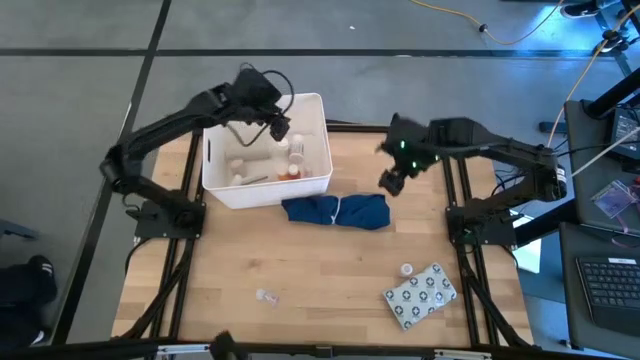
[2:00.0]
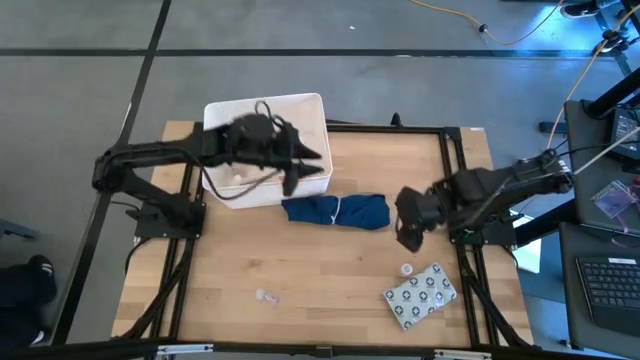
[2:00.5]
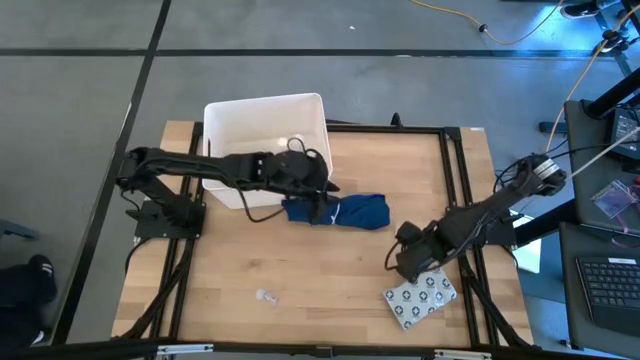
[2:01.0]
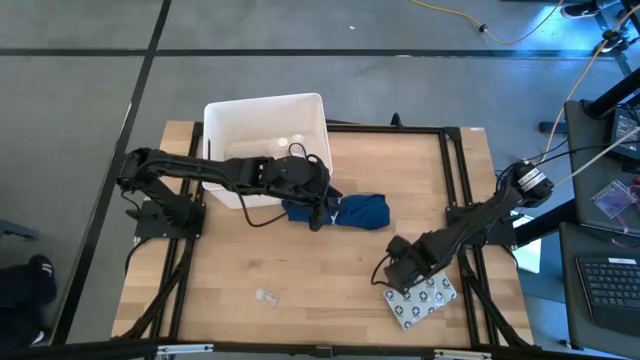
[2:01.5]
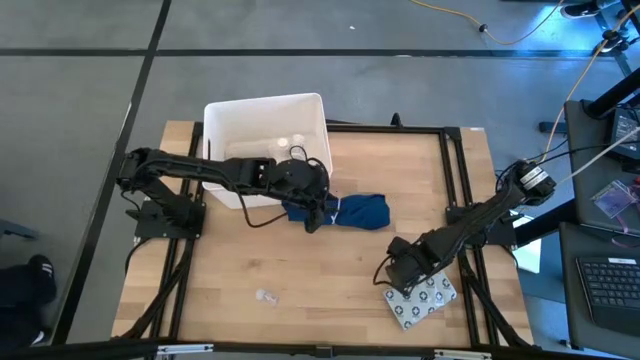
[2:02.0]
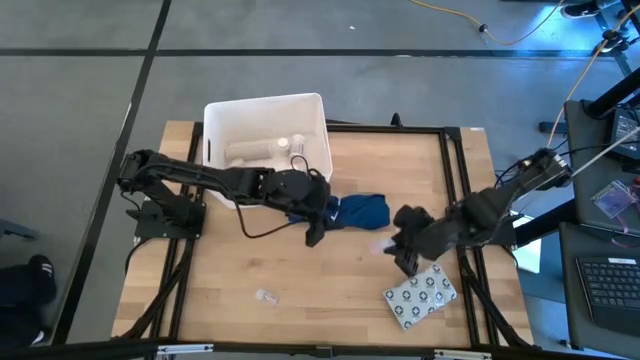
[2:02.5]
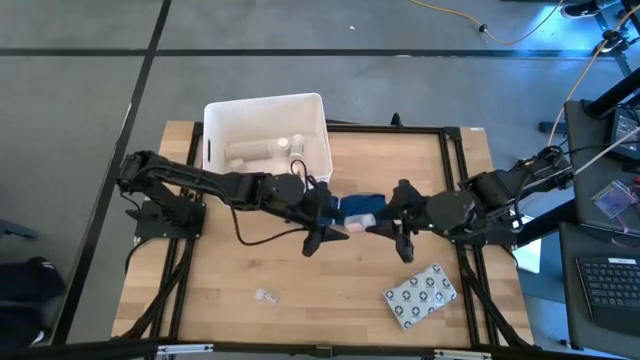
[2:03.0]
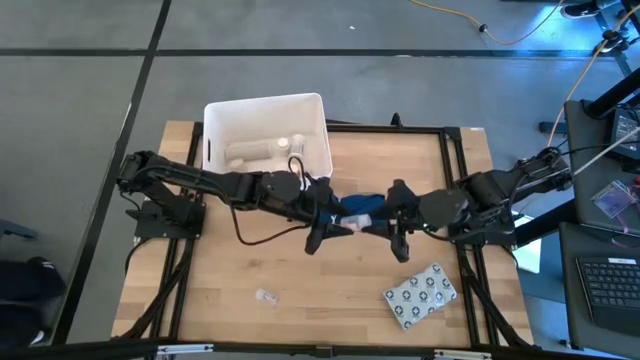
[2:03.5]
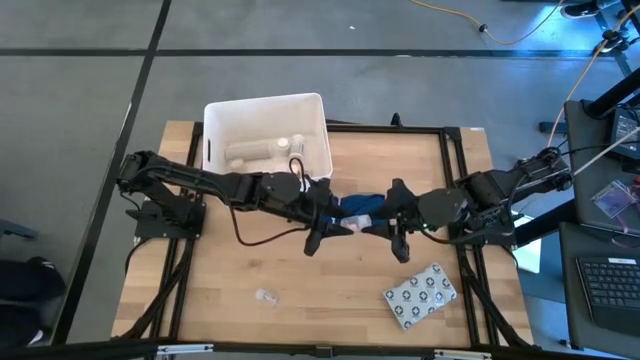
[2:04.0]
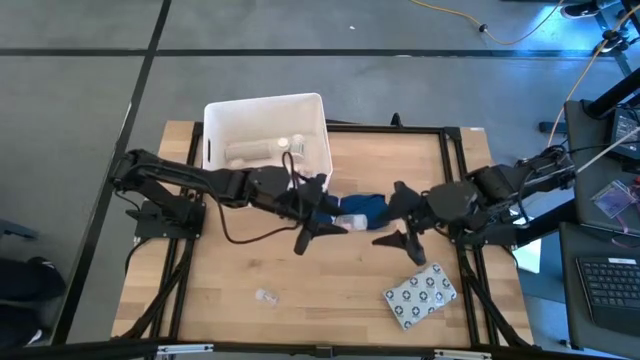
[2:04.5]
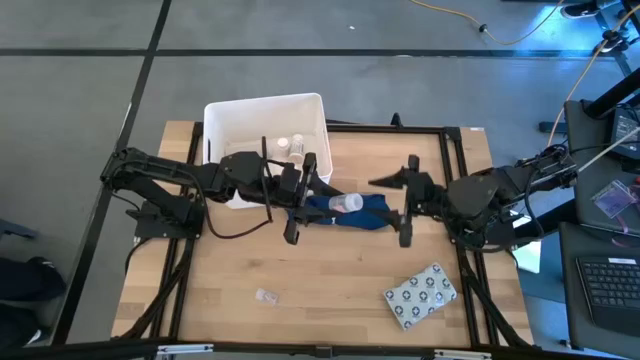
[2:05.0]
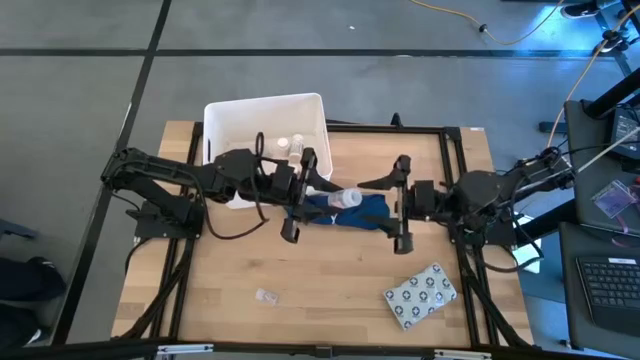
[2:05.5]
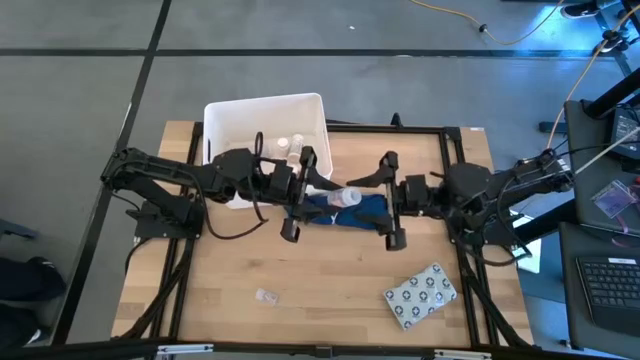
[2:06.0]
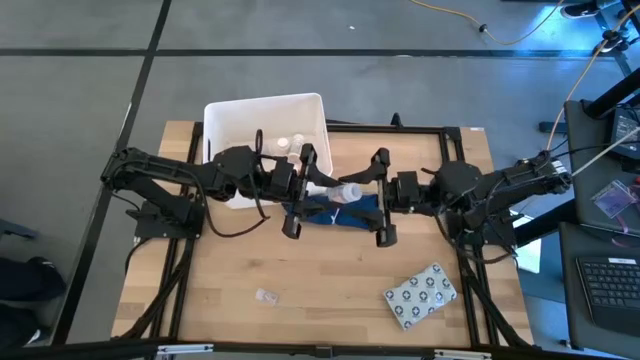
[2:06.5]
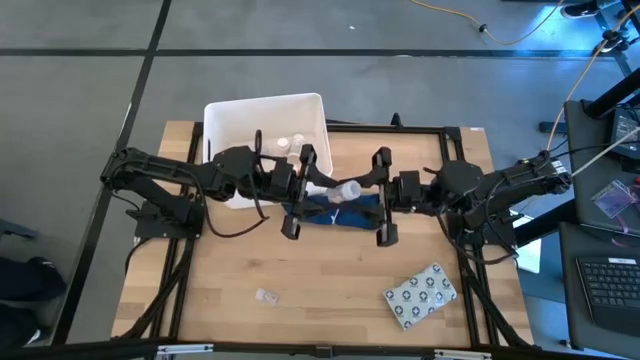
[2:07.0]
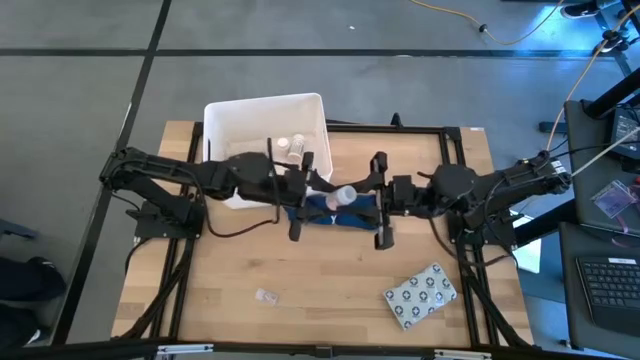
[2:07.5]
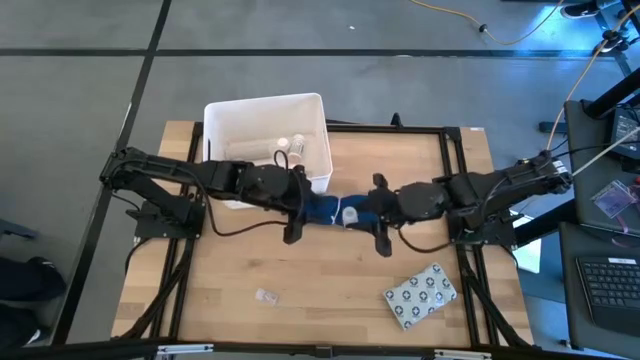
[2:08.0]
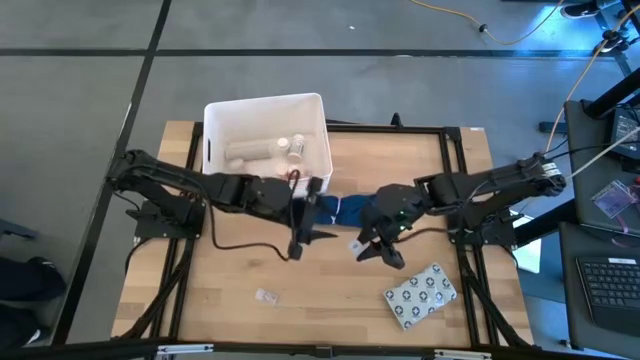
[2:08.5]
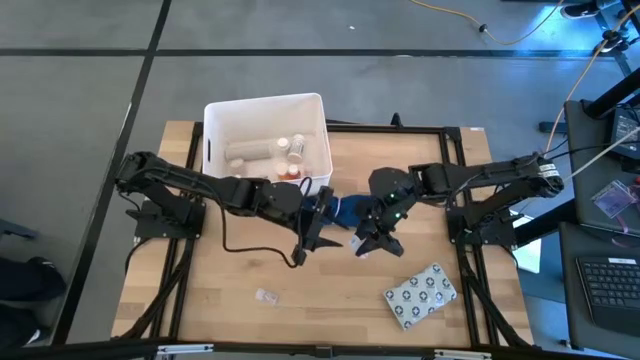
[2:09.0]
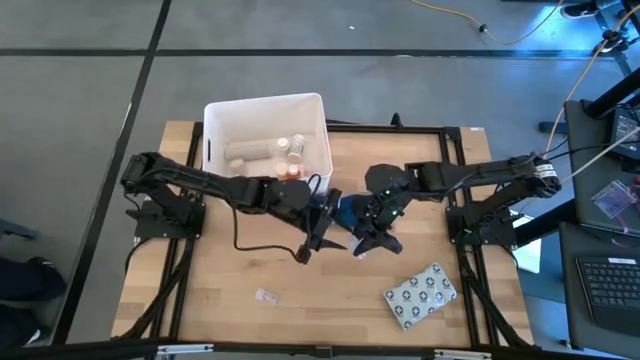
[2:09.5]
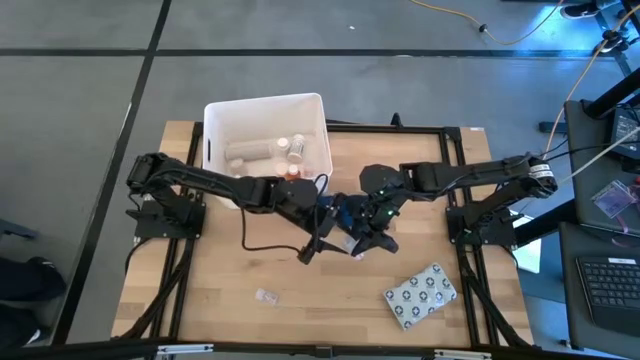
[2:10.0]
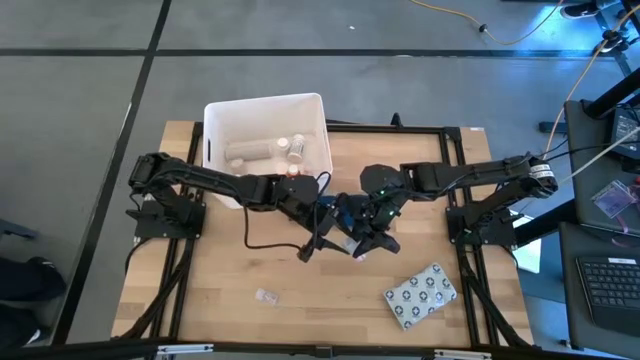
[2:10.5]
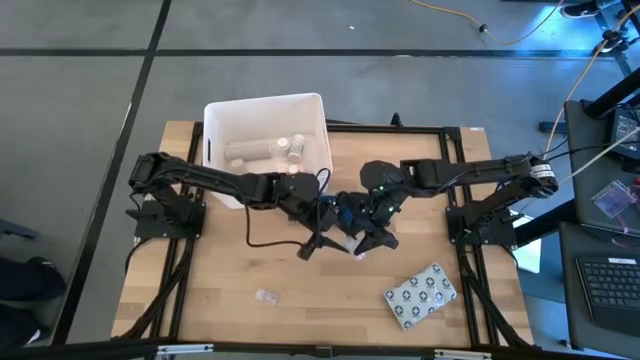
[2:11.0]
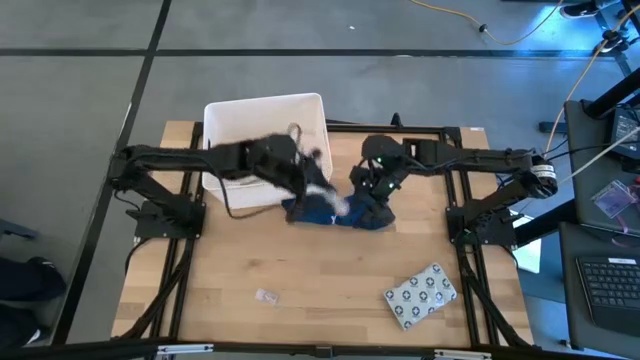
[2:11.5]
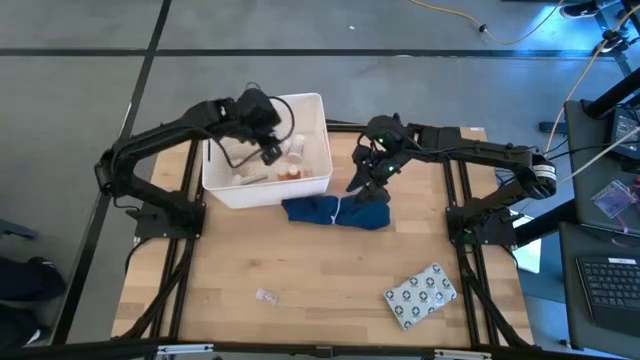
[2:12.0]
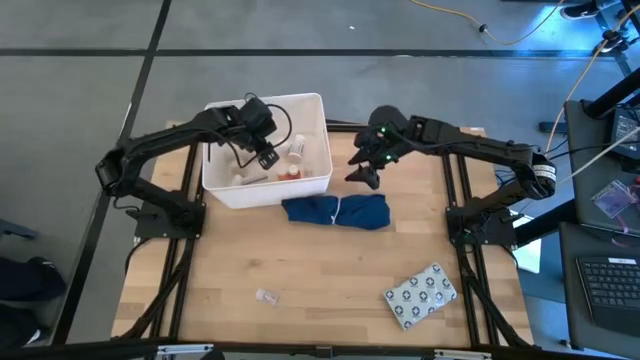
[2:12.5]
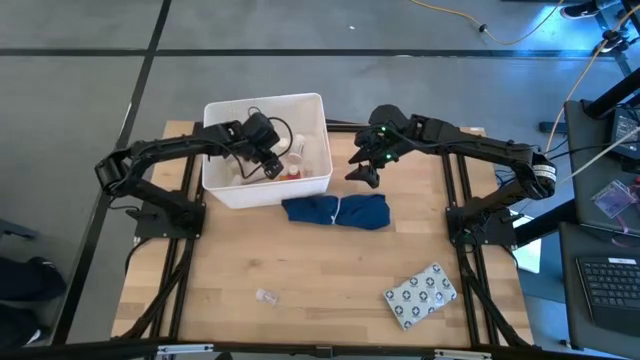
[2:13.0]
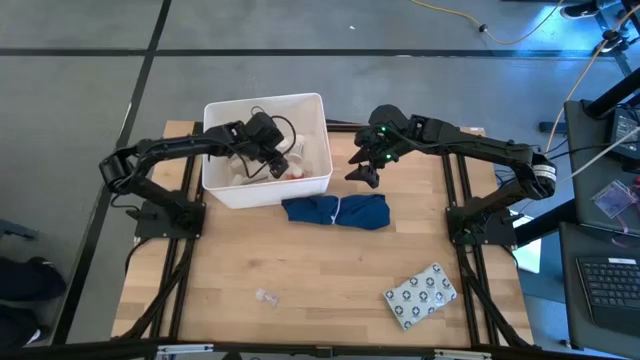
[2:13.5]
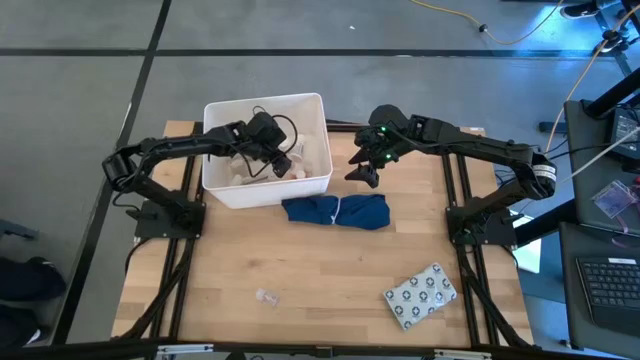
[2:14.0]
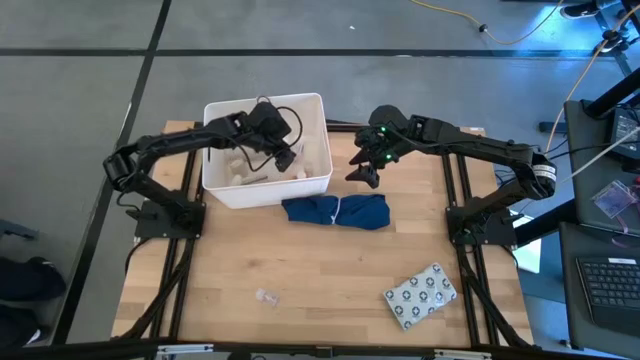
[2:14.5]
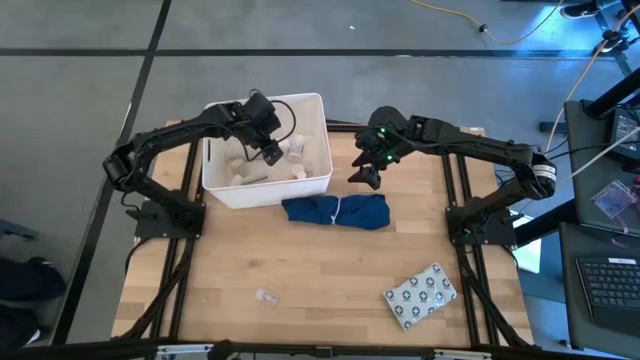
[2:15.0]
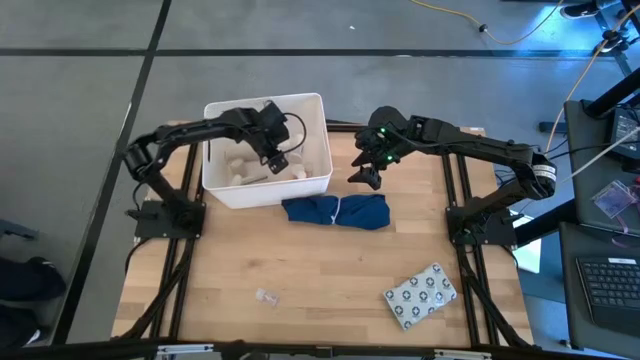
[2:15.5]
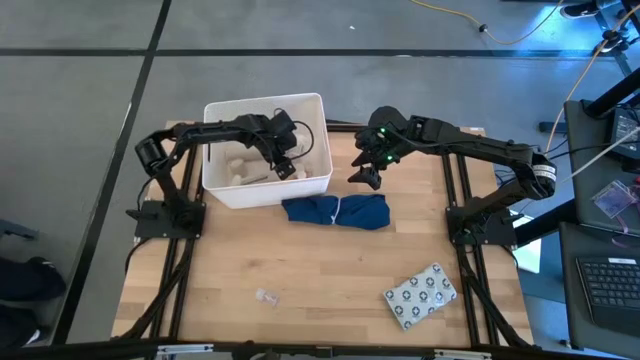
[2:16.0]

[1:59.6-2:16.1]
Task: Pick & place medical supplies in basket/bin
Put the right transparent pill bottle into the white container

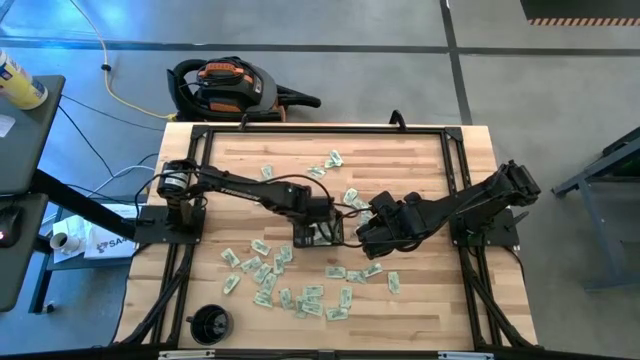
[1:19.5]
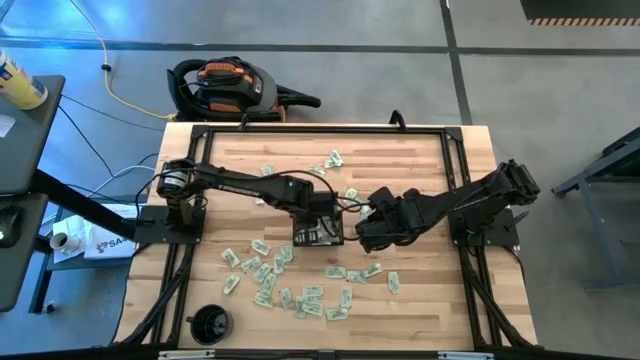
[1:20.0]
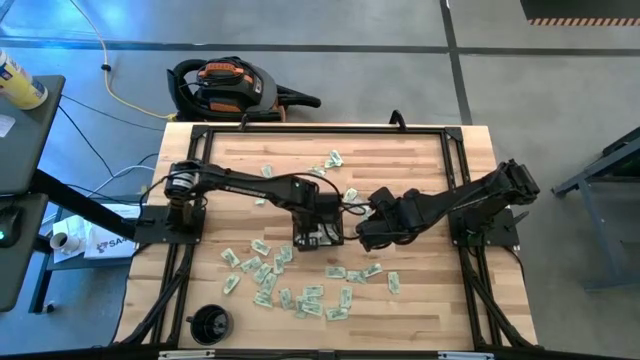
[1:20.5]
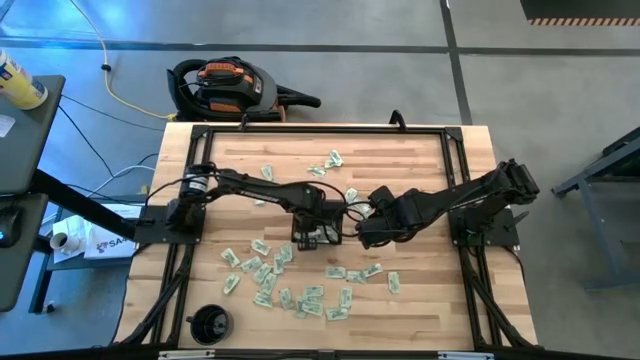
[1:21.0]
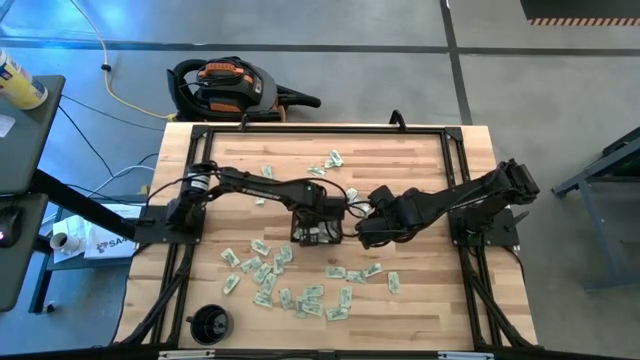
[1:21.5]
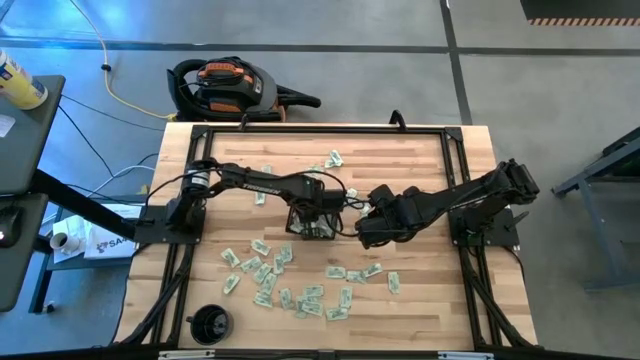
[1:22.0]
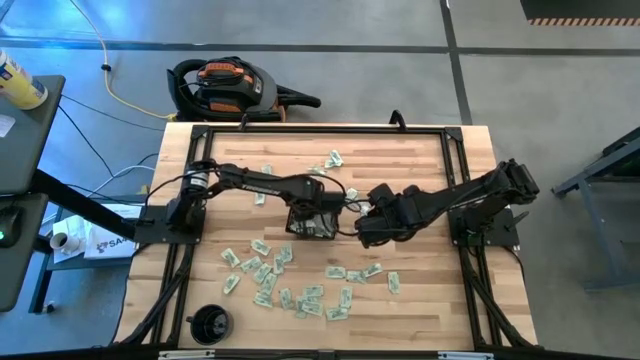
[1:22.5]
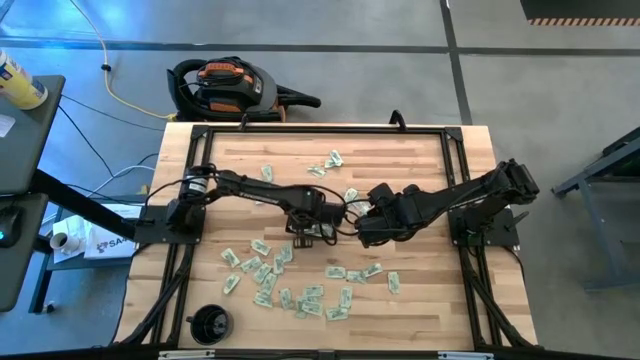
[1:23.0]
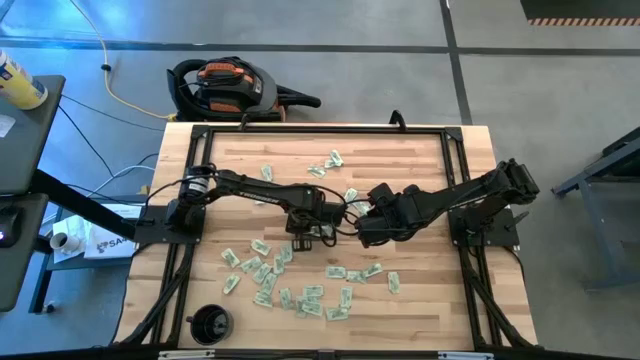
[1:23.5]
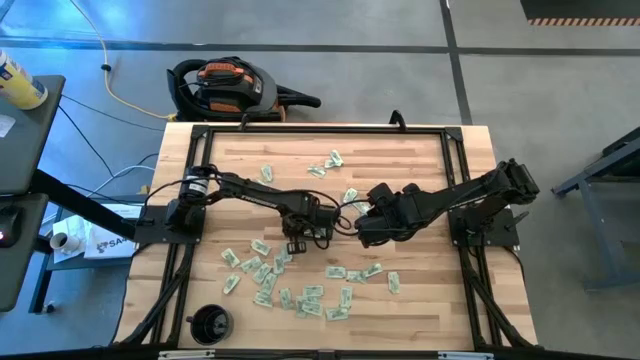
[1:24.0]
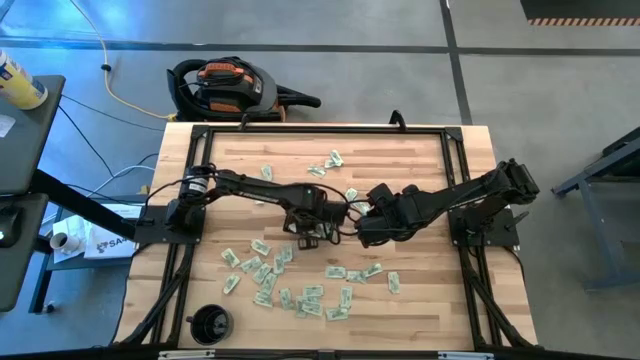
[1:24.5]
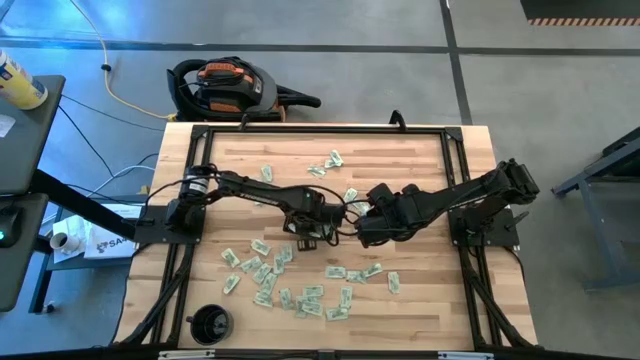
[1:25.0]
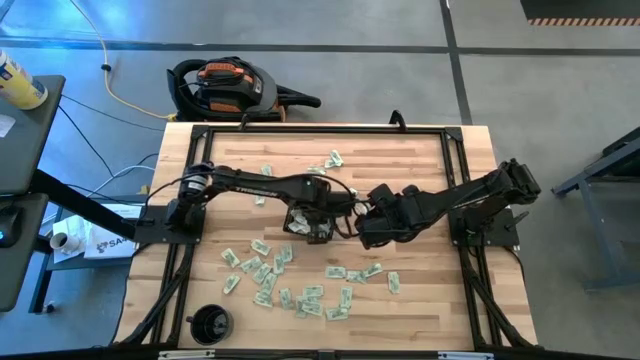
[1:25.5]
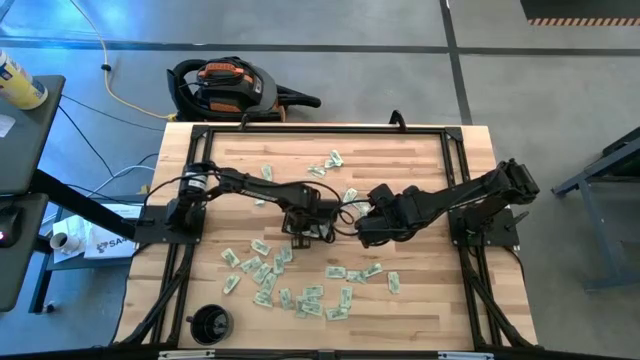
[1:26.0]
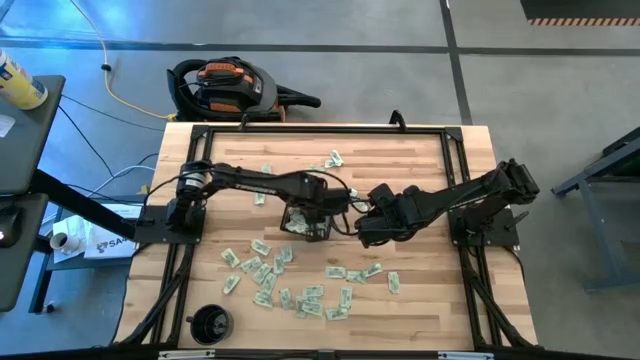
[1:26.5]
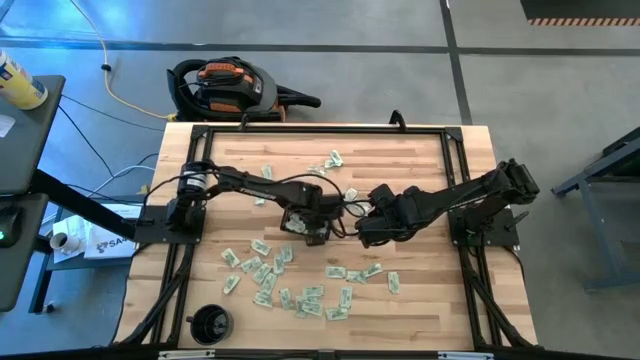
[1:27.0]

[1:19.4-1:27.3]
Task: Pick and place Stevia / Truvia into bins
Adjust the green stevia packets in the black basket
